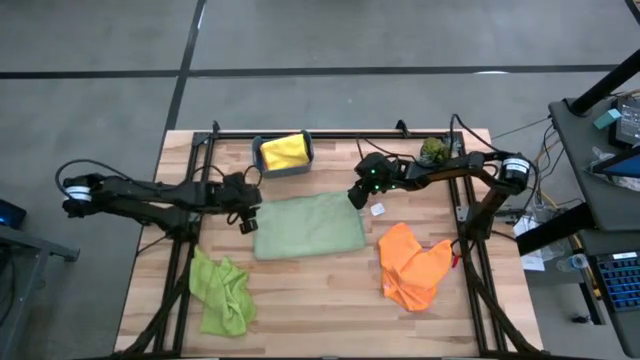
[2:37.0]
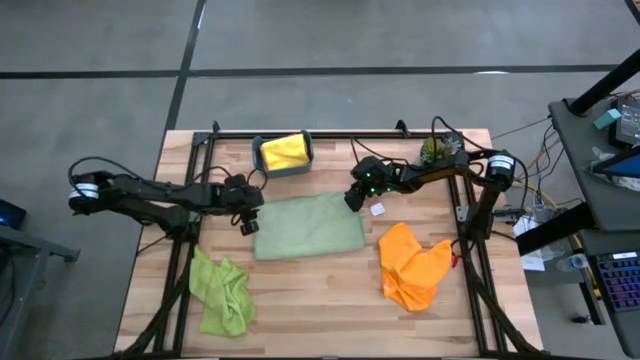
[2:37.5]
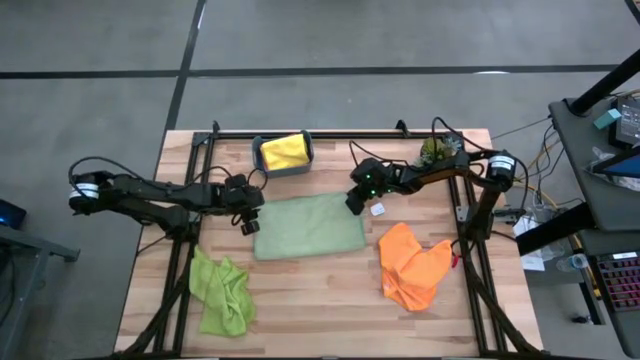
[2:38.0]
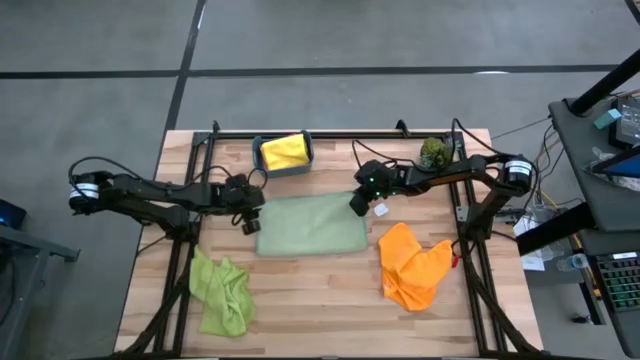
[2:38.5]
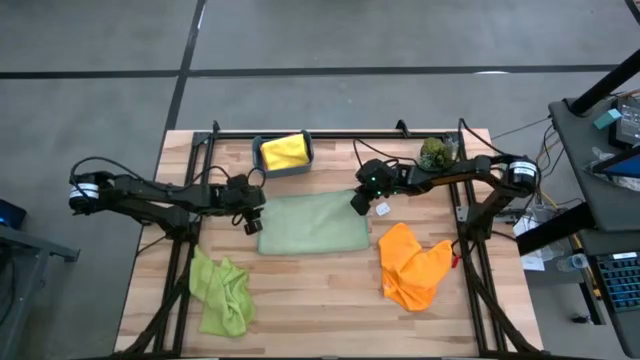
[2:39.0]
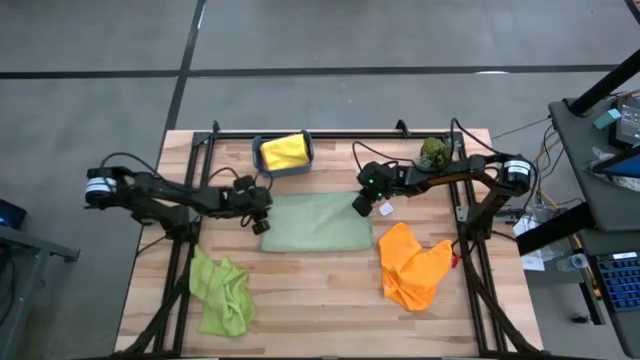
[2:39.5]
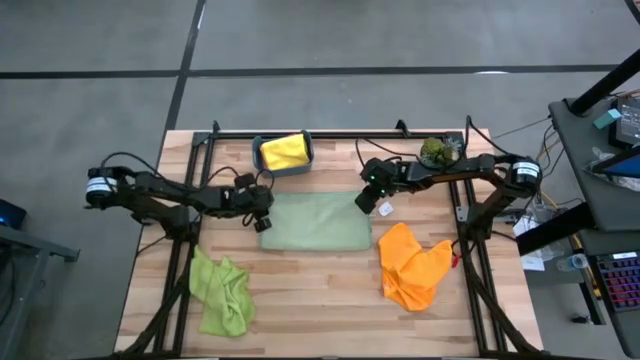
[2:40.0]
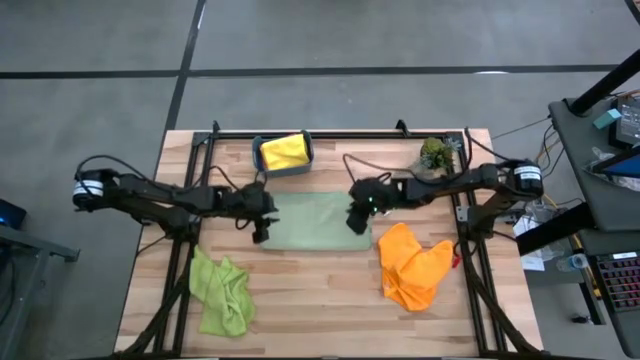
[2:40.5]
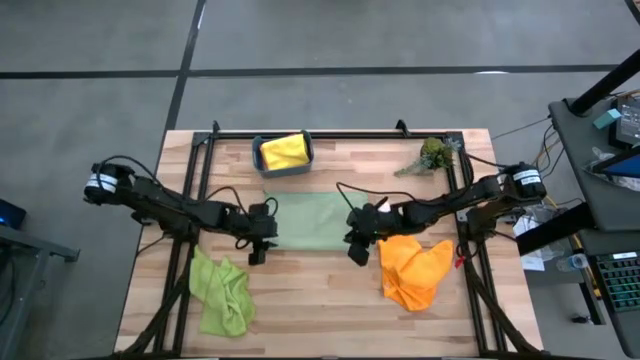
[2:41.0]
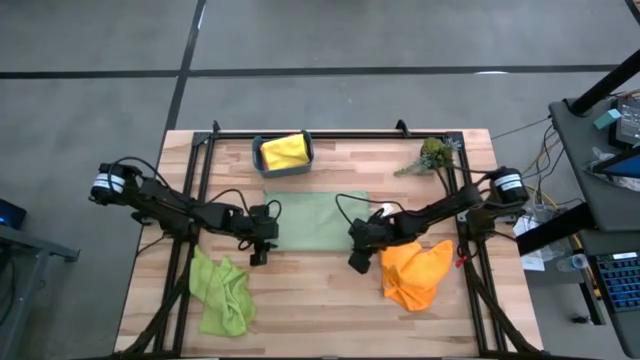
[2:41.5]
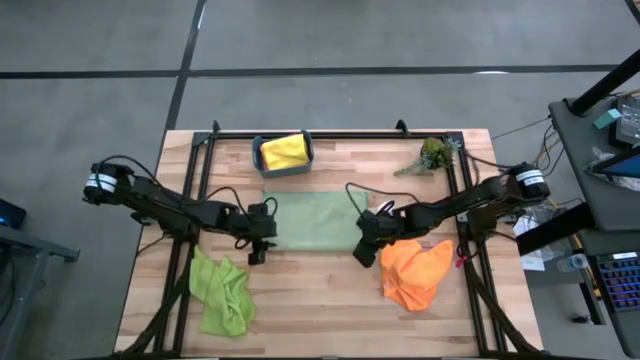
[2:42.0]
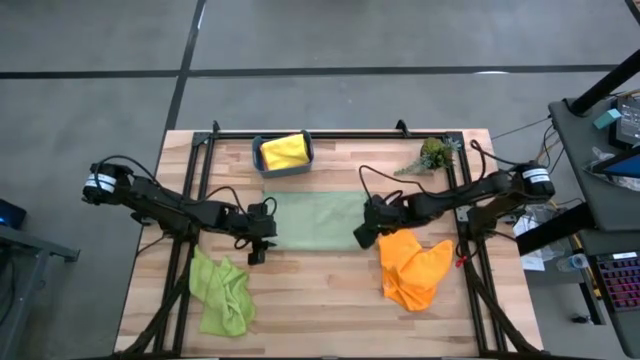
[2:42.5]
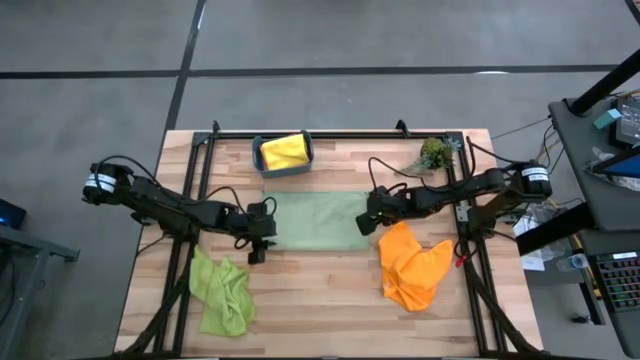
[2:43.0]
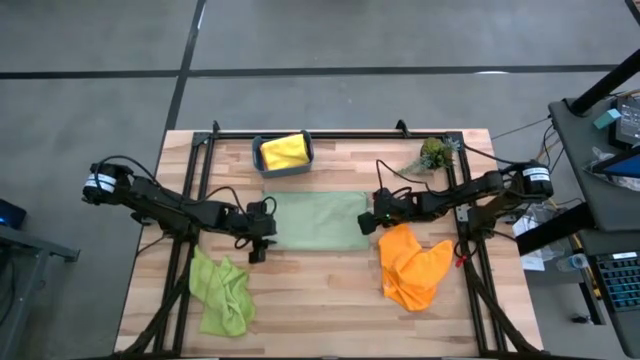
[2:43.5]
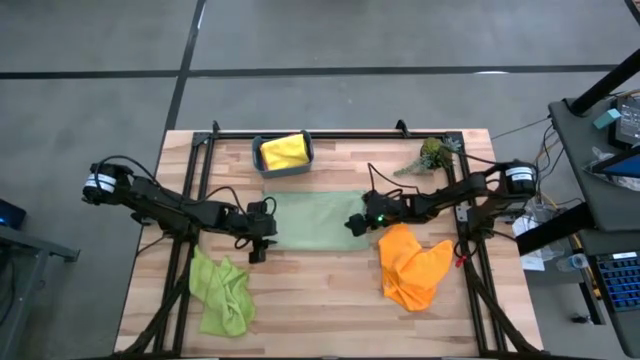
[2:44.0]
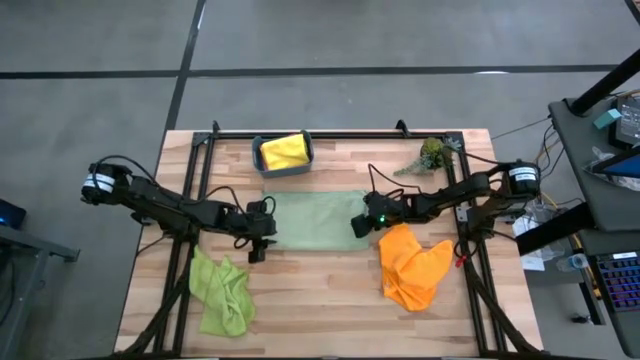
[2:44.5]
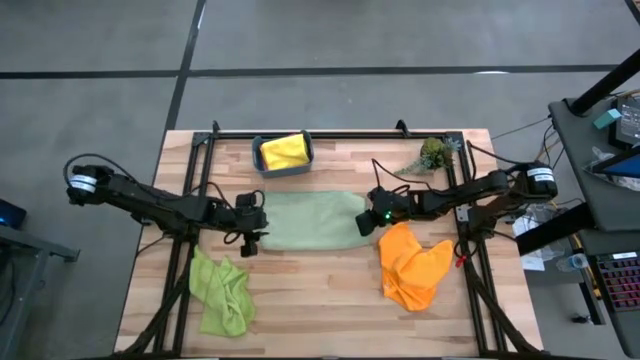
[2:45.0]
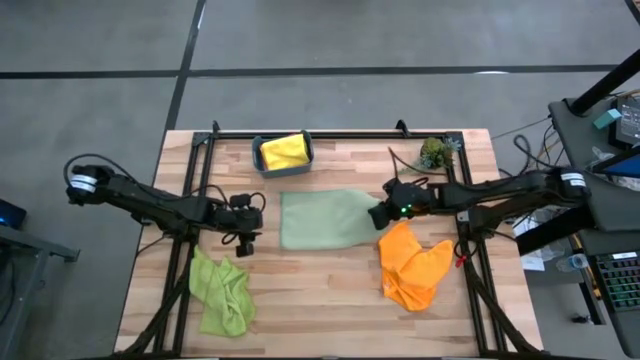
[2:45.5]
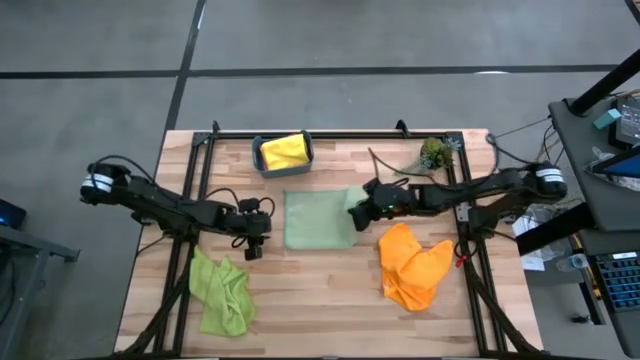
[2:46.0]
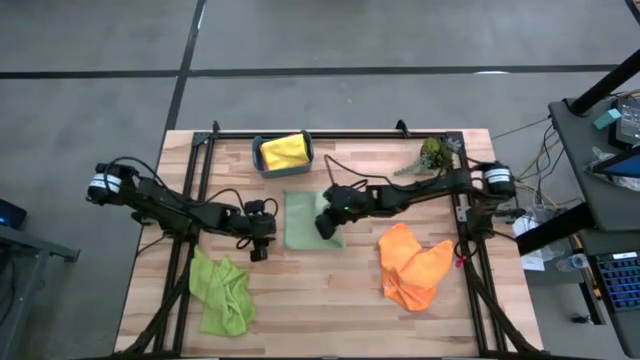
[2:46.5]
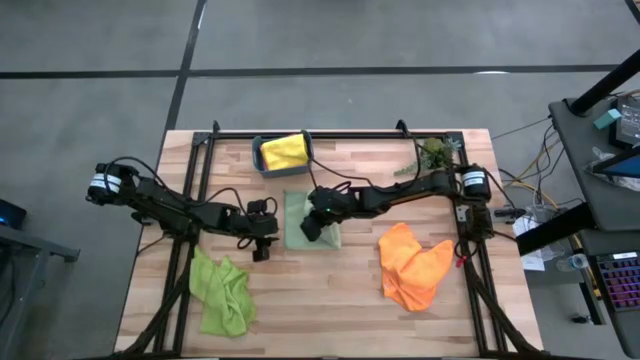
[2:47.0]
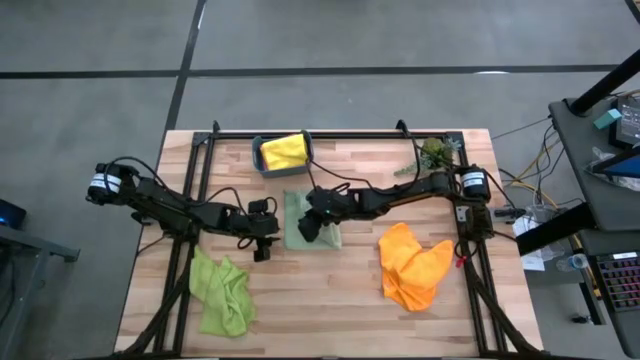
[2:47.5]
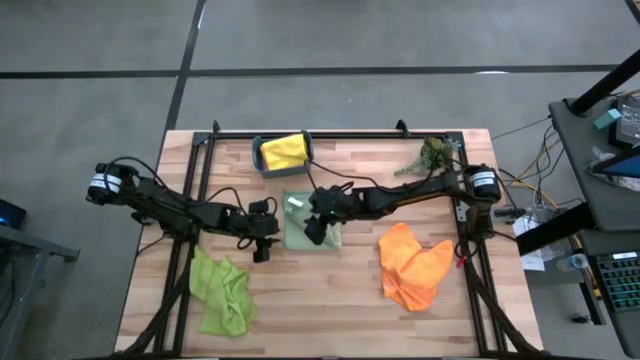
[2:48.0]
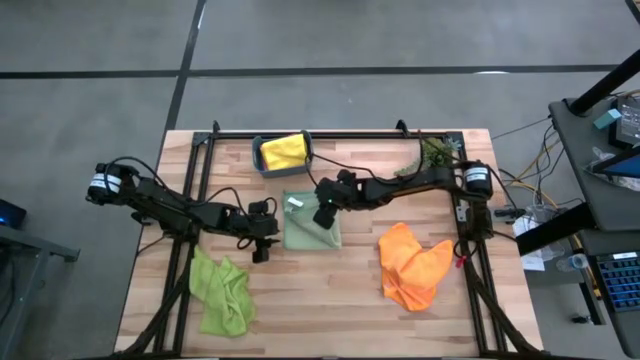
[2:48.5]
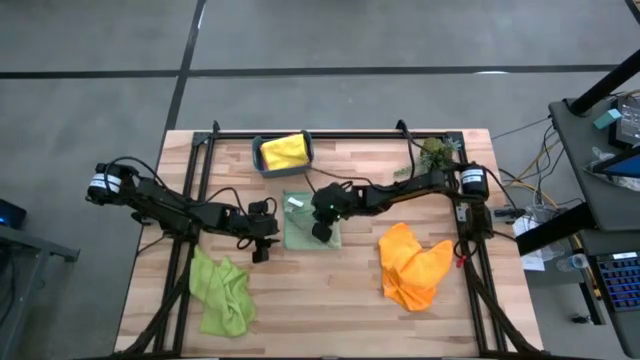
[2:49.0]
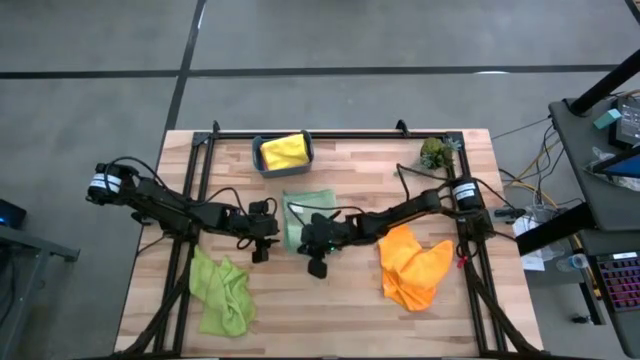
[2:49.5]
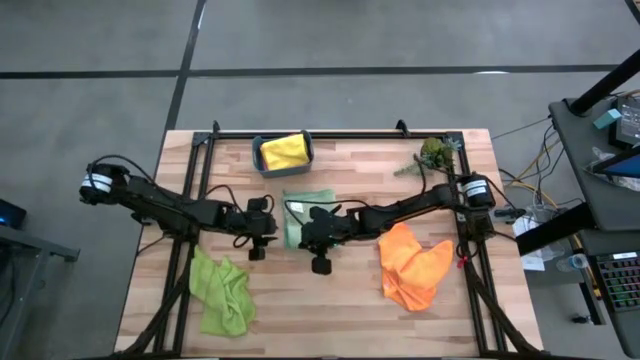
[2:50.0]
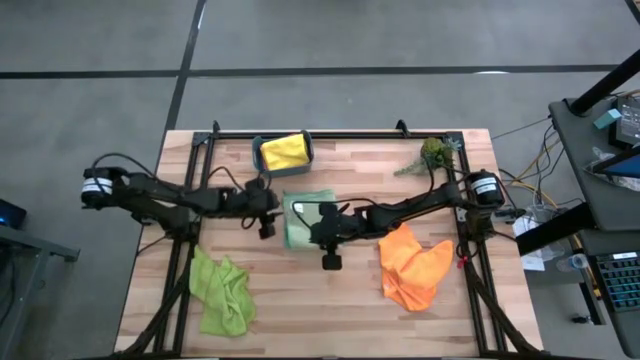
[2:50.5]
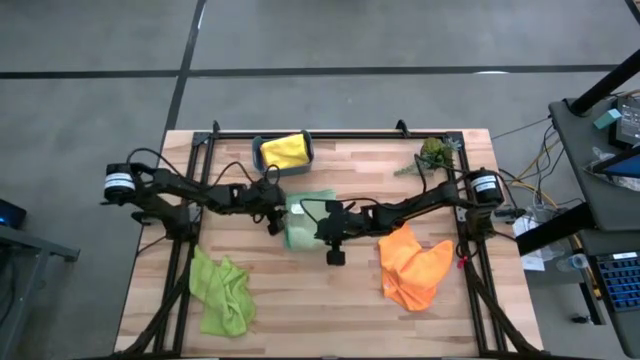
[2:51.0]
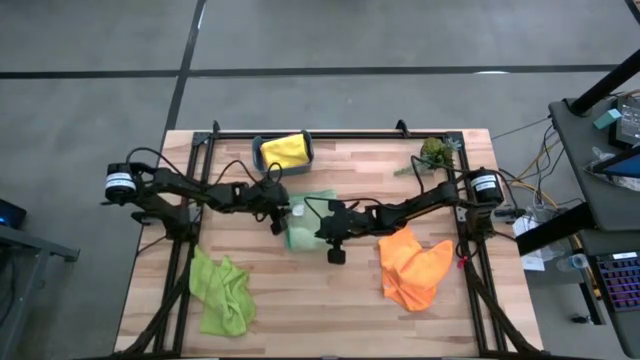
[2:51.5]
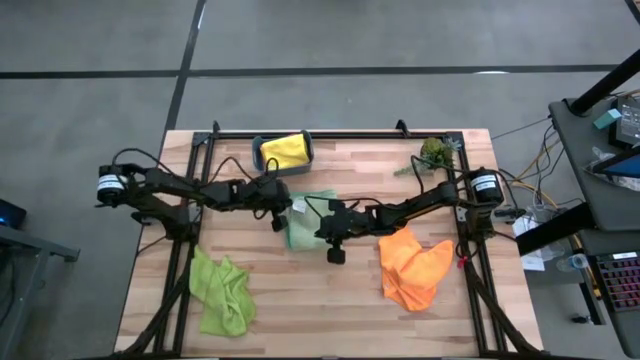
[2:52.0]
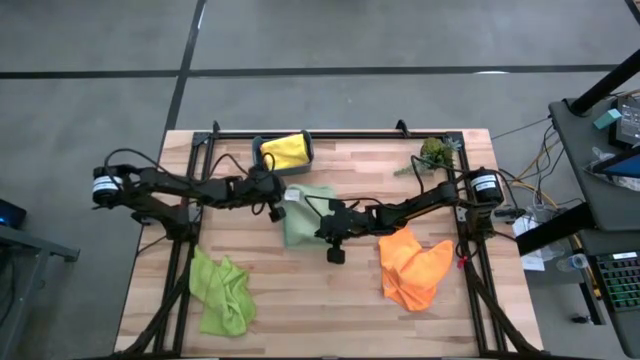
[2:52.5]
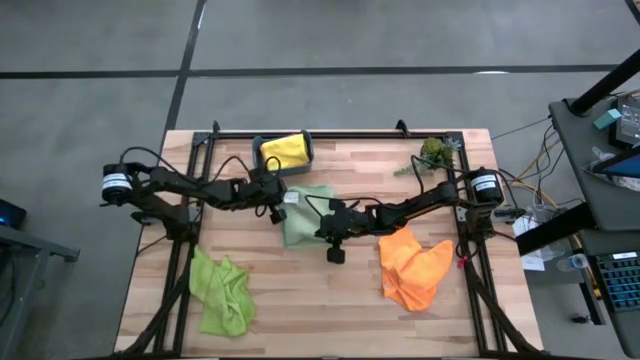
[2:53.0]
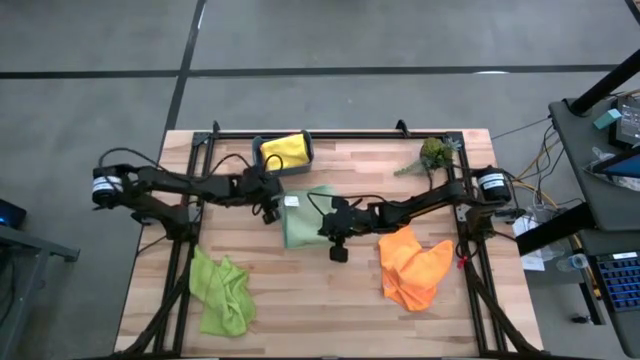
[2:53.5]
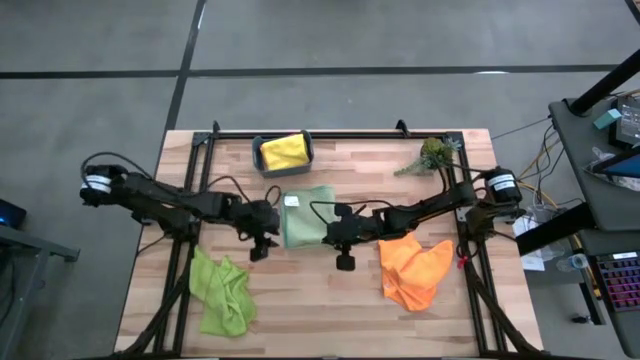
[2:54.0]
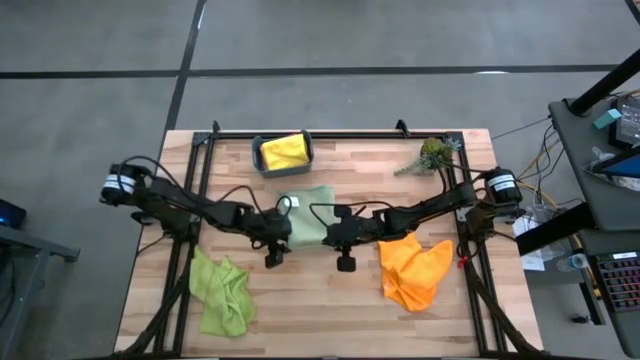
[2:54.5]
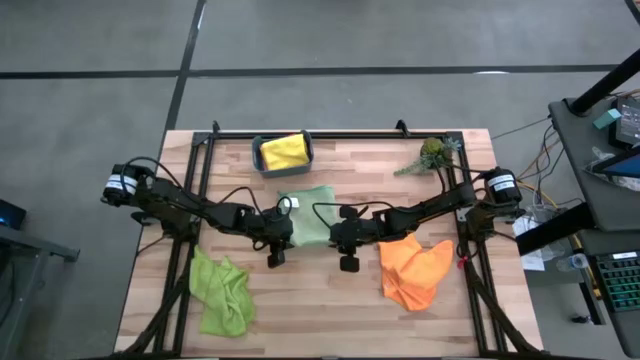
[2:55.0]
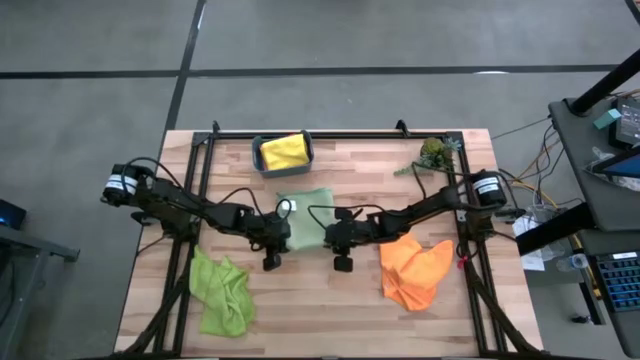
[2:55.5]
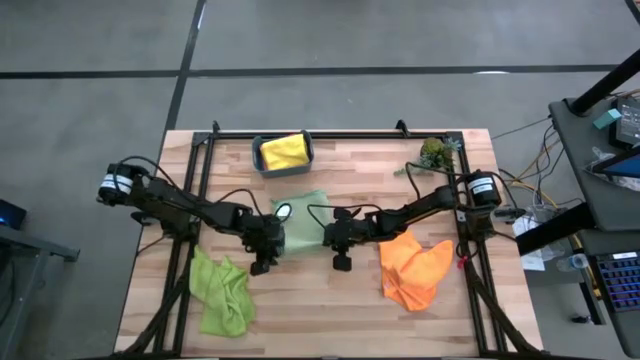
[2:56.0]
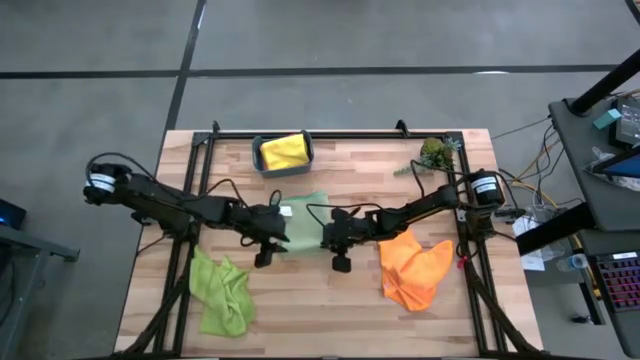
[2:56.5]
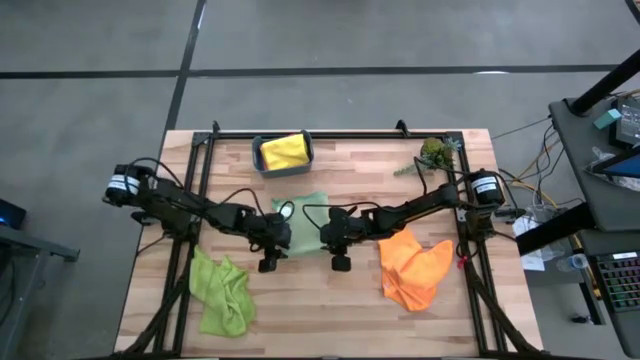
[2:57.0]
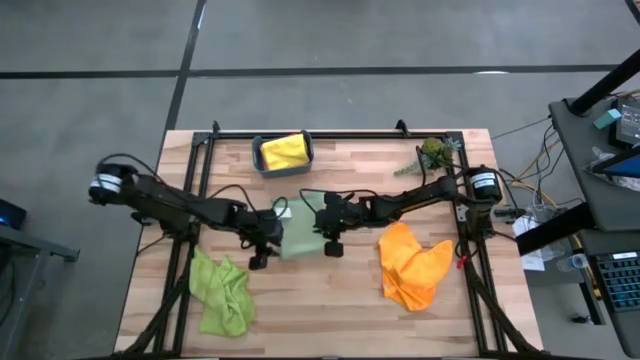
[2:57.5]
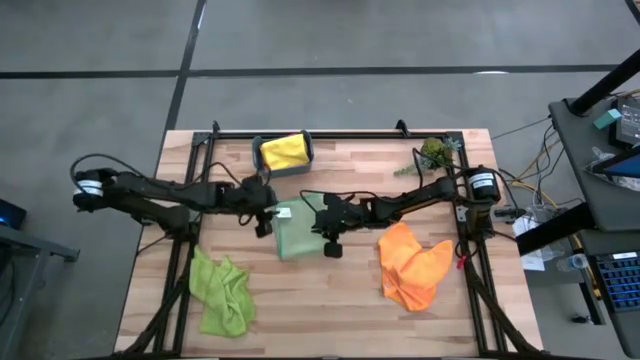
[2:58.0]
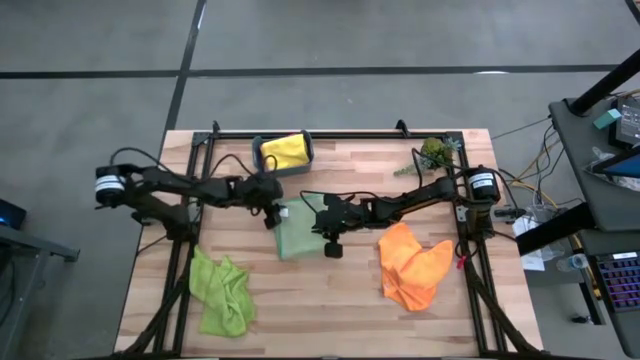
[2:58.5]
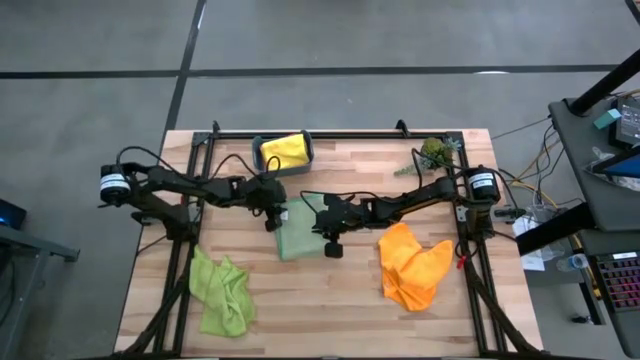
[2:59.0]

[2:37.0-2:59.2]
Task: Fold microfiber towels
Fold the green microfiber towel

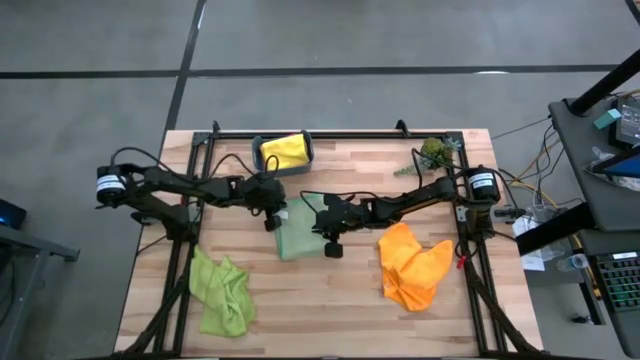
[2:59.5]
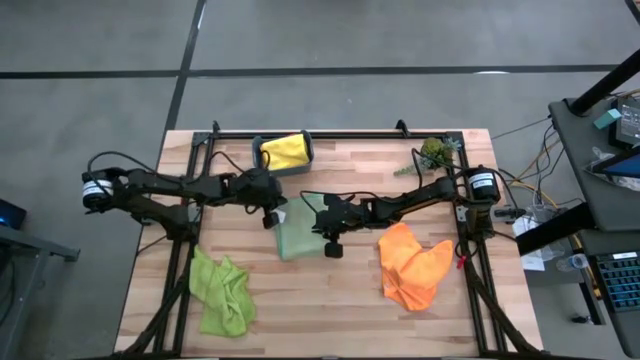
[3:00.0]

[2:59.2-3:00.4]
Fold the green microfiber towel
